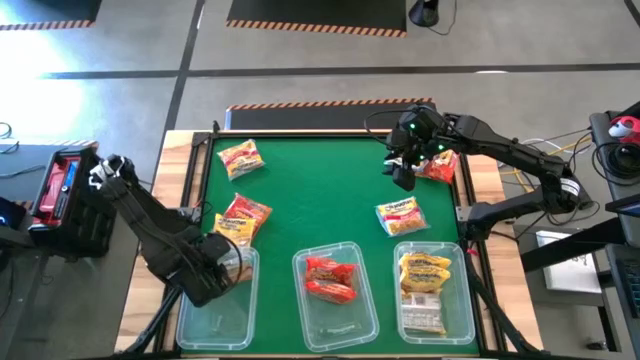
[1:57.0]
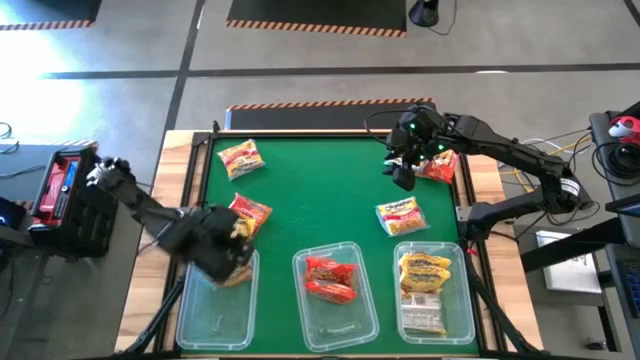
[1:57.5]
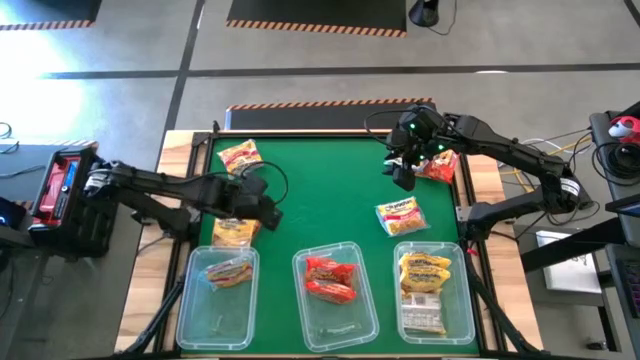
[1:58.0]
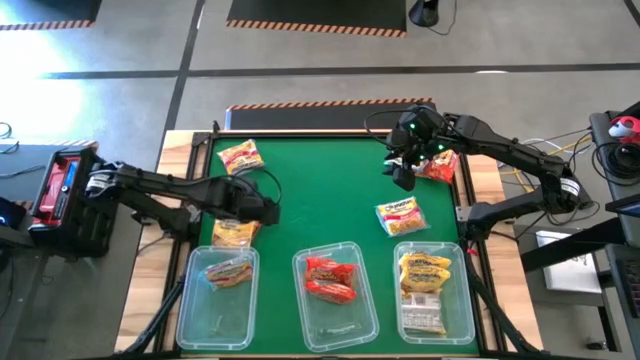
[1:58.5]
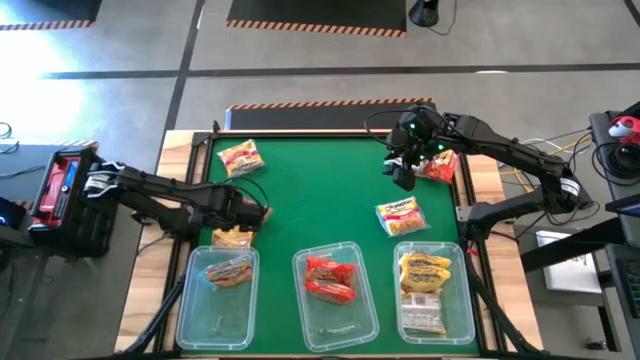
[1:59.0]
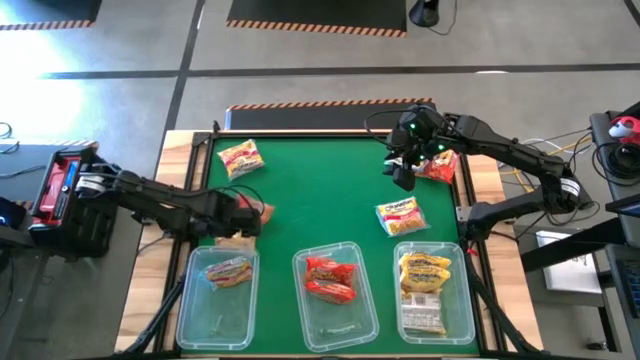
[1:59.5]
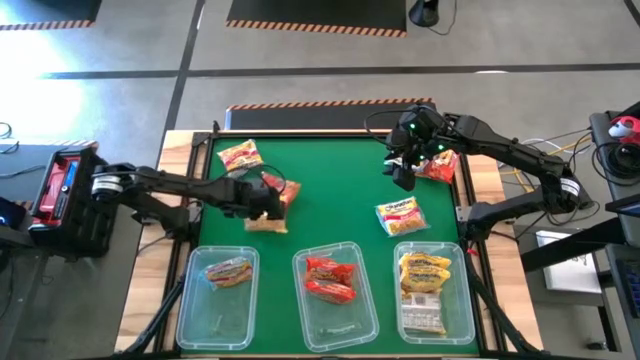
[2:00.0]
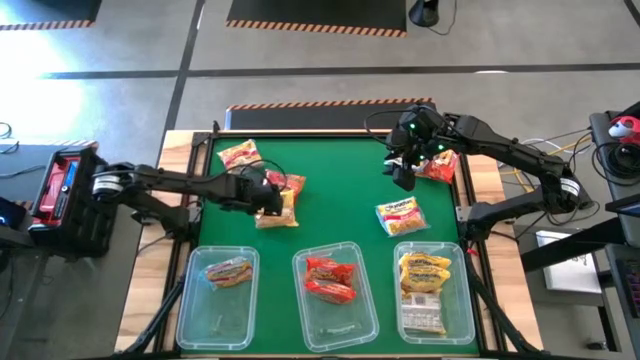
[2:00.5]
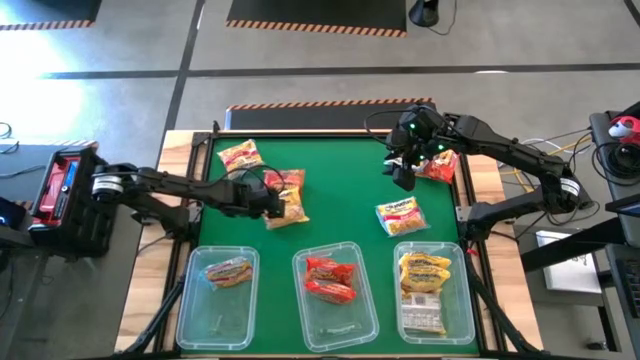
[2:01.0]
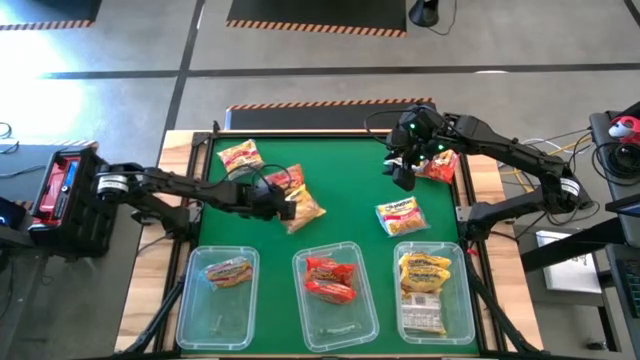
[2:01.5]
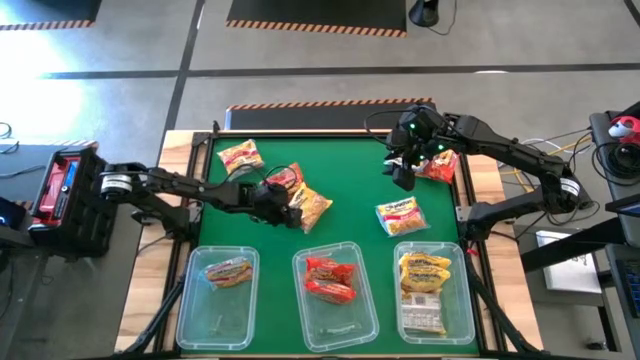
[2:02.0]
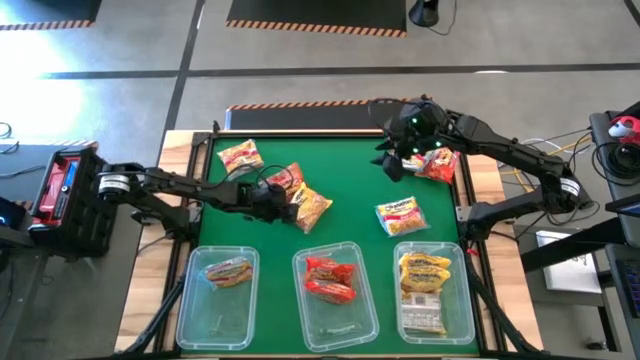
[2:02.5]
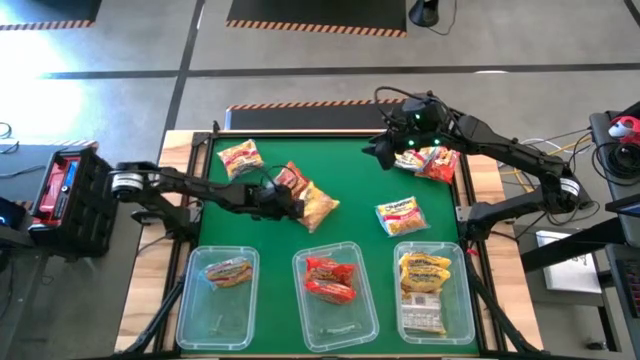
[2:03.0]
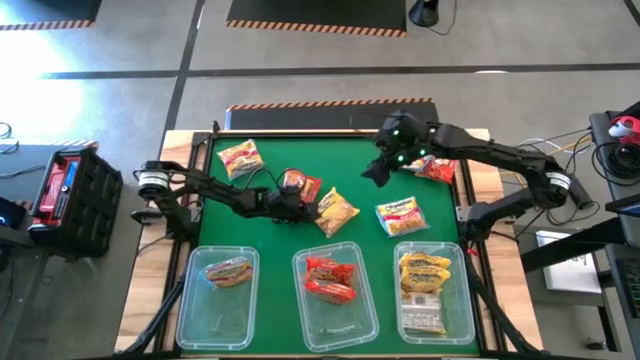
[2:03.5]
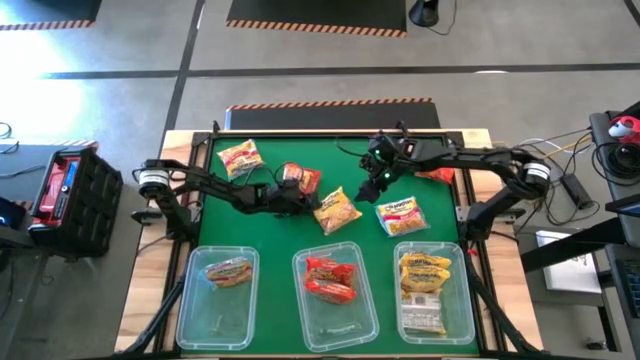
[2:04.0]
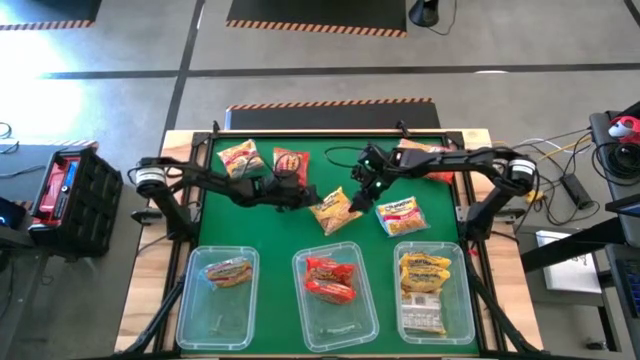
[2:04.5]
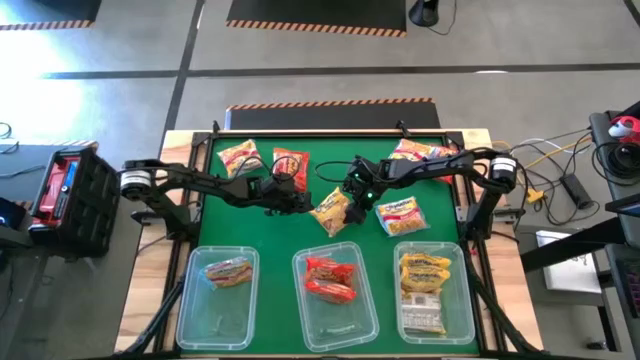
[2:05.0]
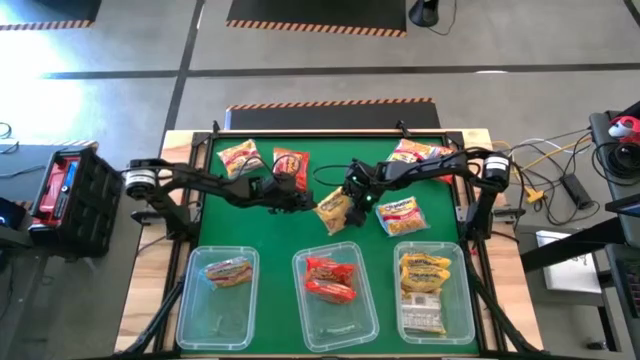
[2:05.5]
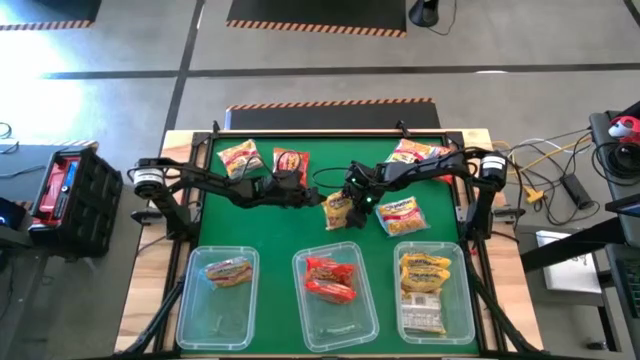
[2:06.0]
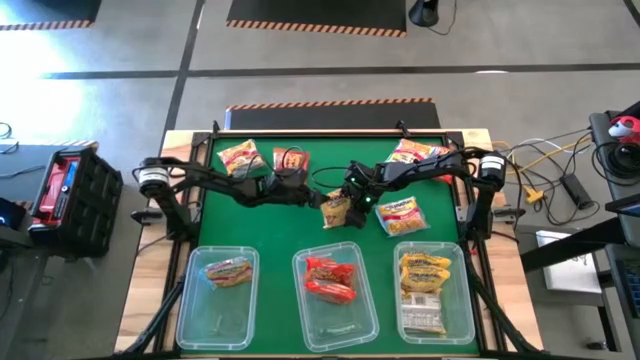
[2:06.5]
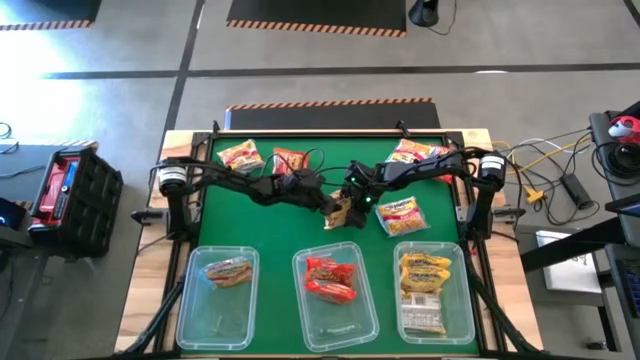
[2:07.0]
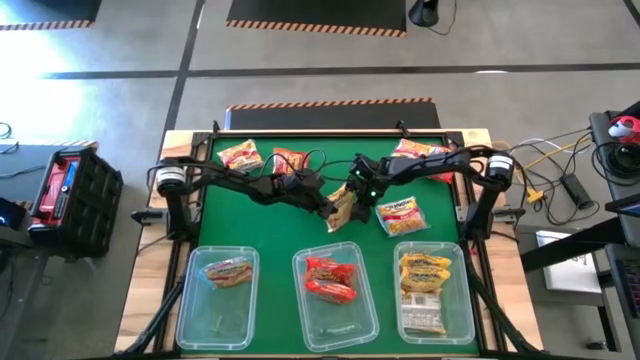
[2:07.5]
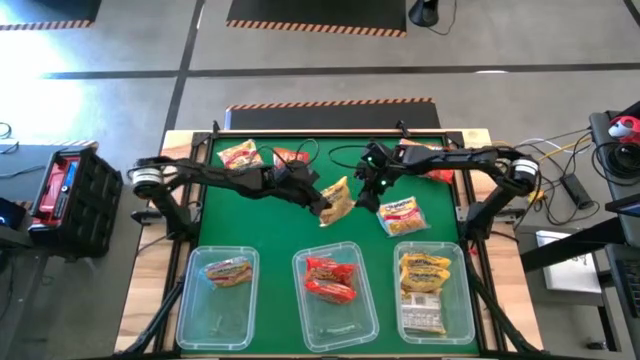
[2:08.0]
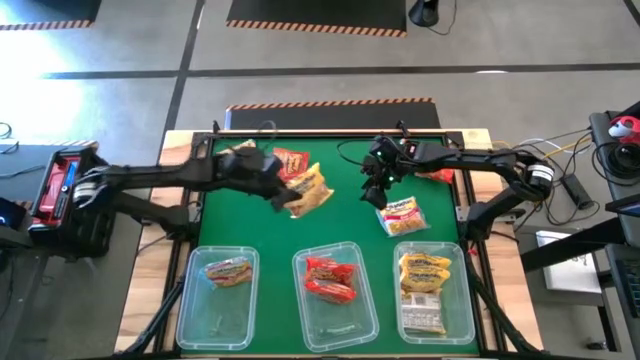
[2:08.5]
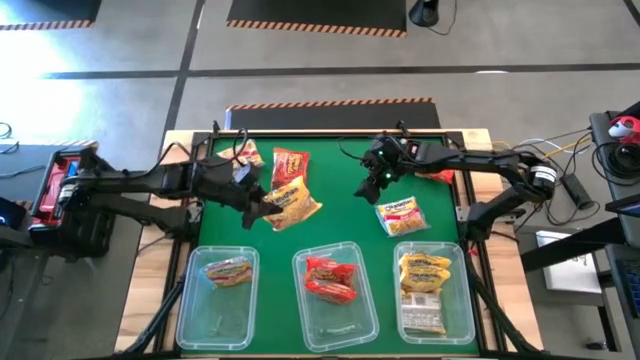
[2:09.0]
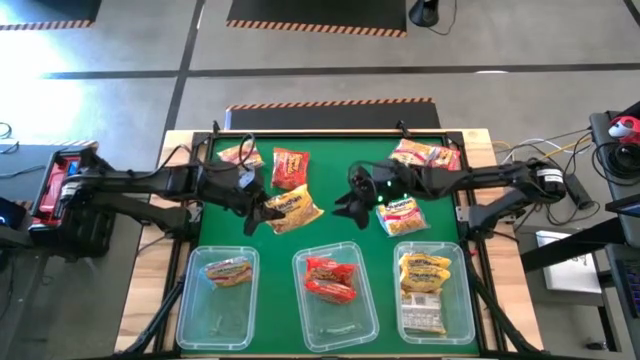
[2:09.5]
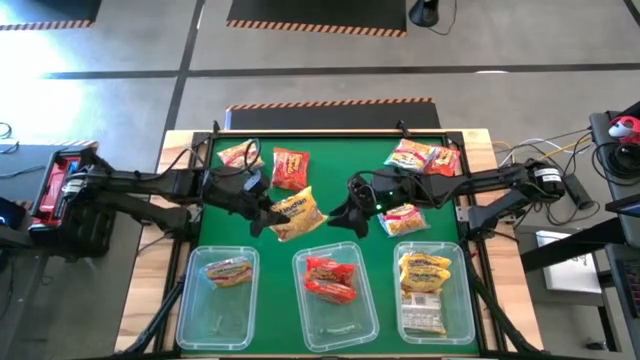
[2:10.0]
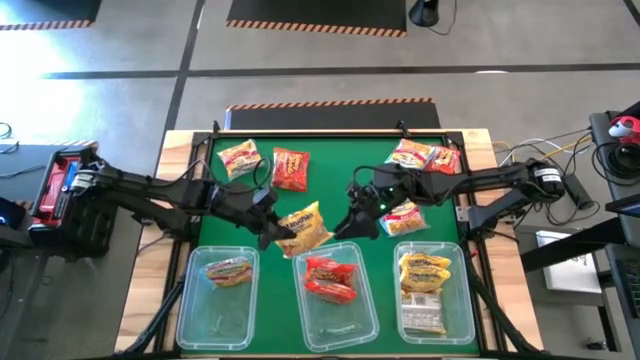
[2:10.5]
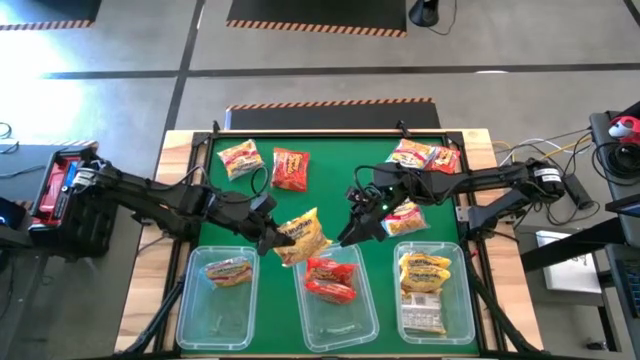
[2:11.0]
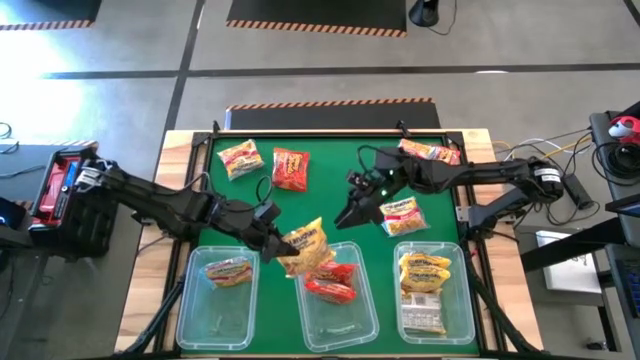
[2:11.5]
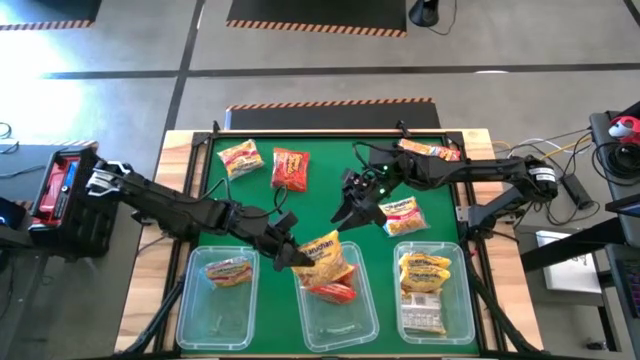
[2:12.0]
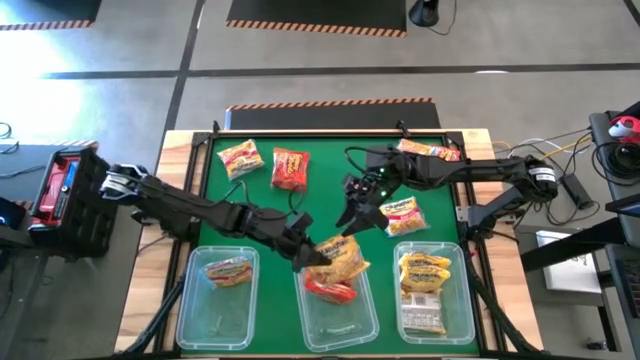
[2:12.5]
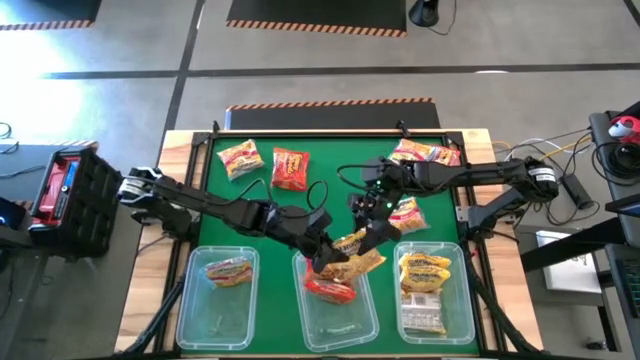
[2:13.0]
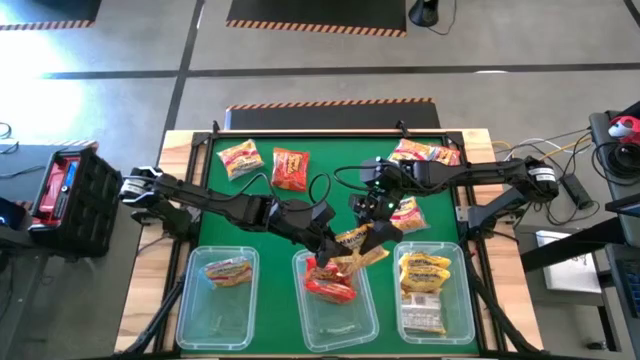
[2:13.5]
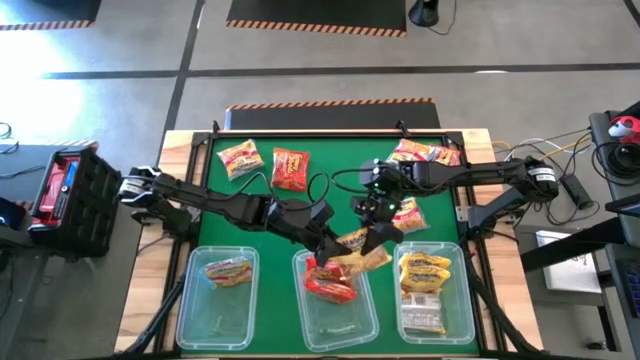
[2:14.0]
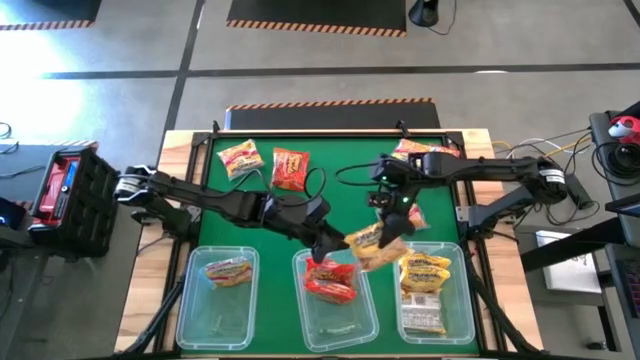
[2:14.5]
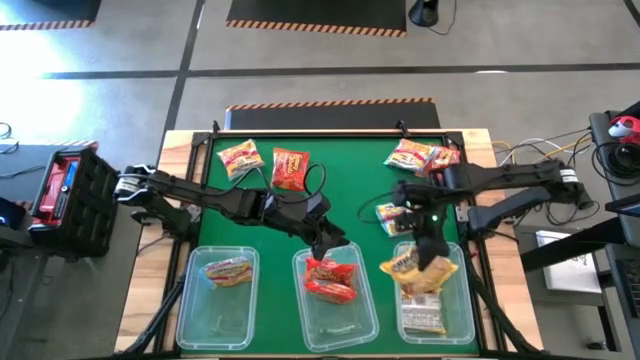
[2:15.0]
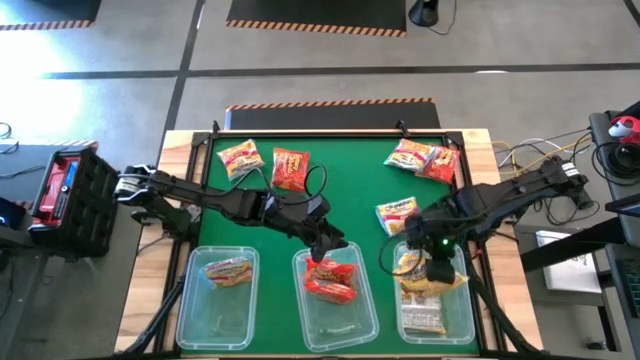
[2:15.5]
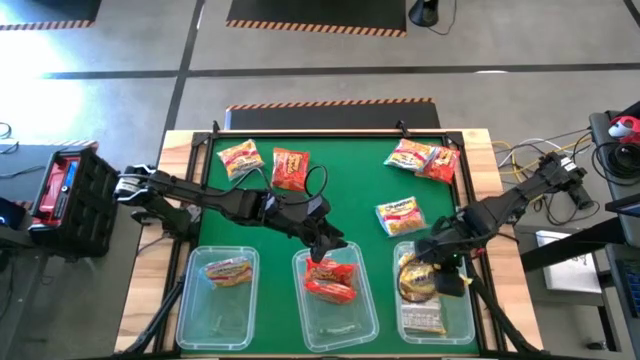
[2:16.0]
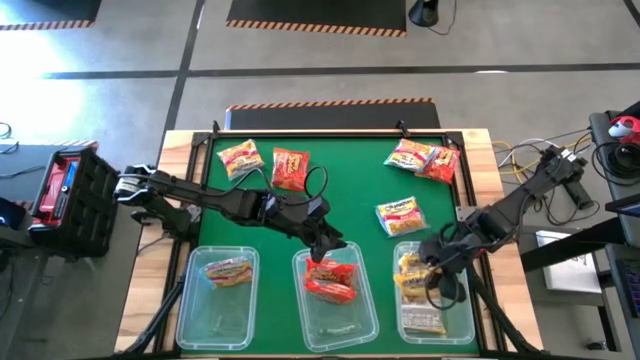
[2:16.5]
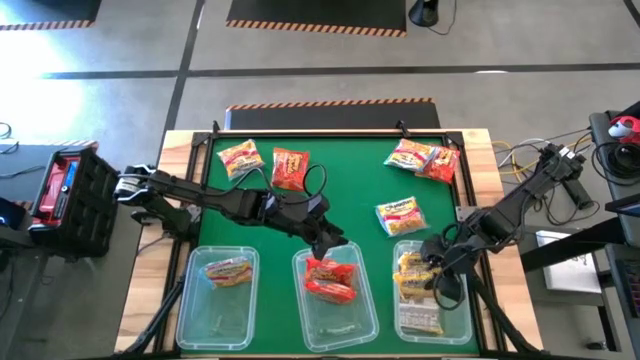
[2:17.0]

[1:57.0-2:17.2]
Task: Sort Maruchan noodles
Put the yellow noodle pack into the right transparent bin
